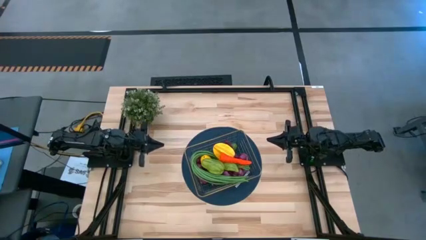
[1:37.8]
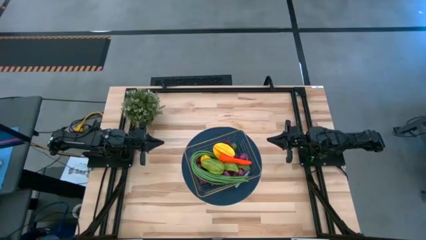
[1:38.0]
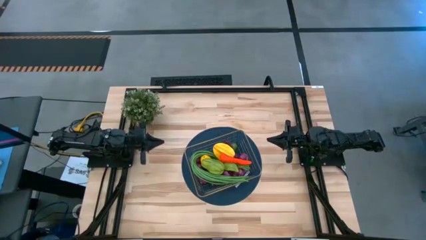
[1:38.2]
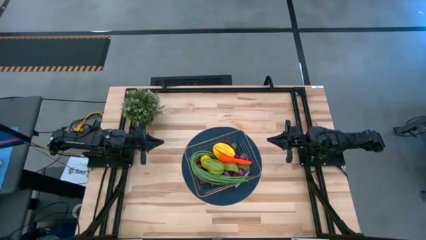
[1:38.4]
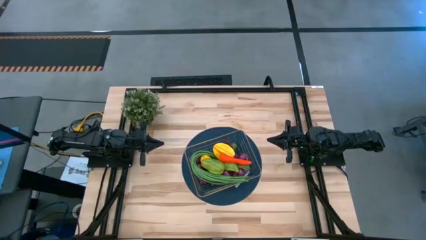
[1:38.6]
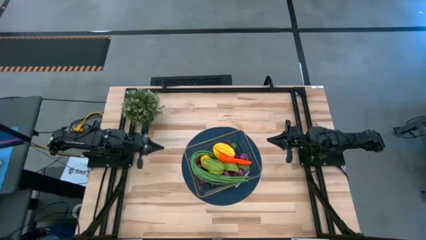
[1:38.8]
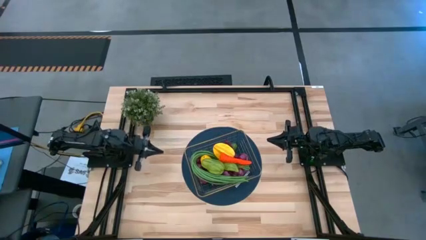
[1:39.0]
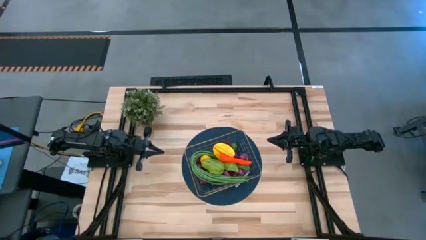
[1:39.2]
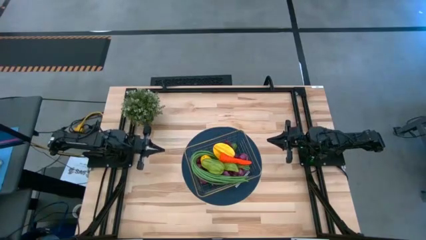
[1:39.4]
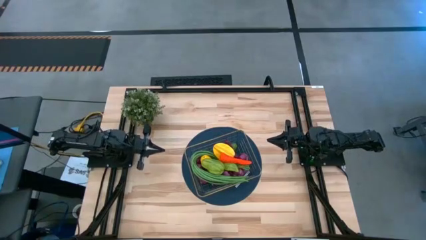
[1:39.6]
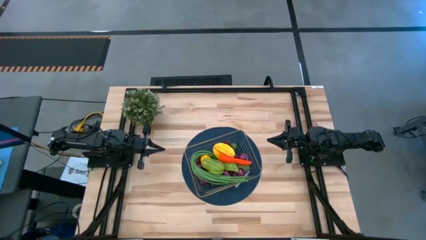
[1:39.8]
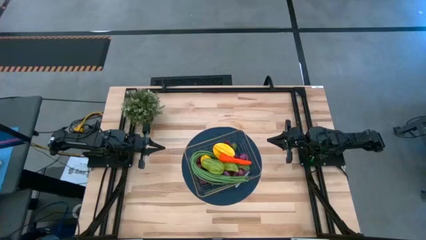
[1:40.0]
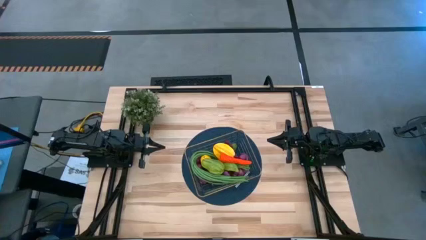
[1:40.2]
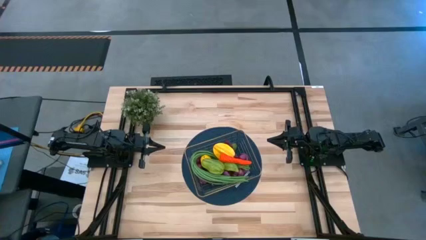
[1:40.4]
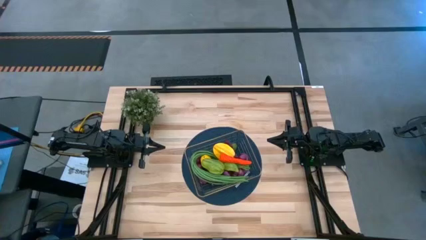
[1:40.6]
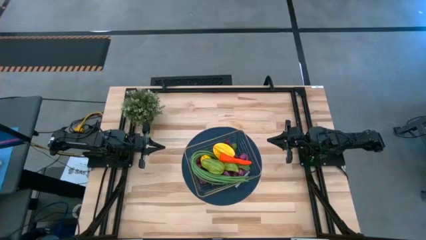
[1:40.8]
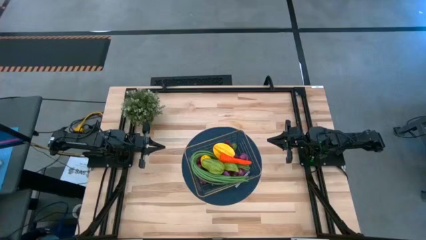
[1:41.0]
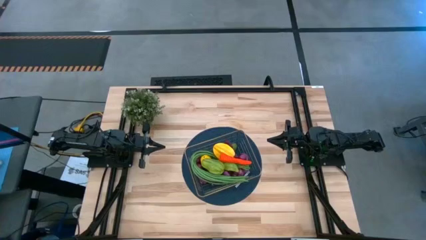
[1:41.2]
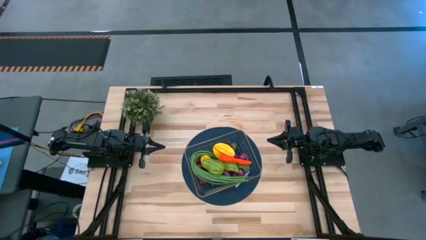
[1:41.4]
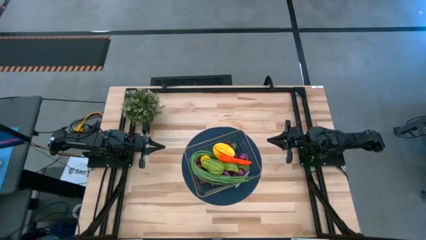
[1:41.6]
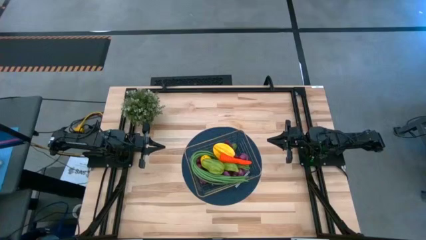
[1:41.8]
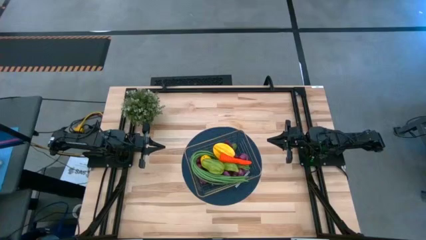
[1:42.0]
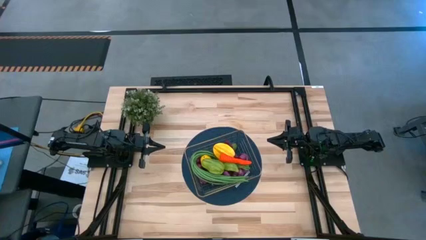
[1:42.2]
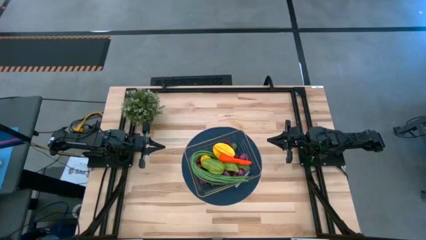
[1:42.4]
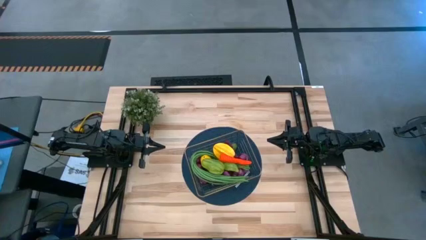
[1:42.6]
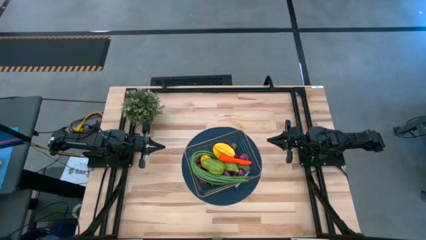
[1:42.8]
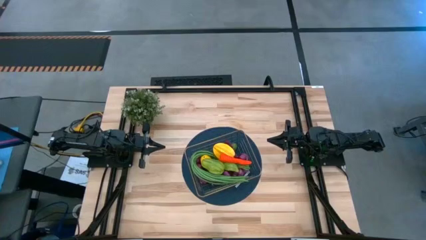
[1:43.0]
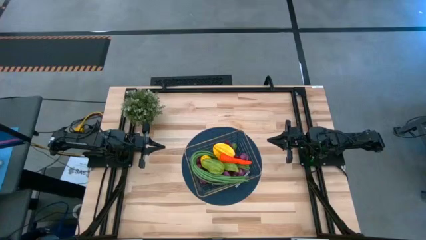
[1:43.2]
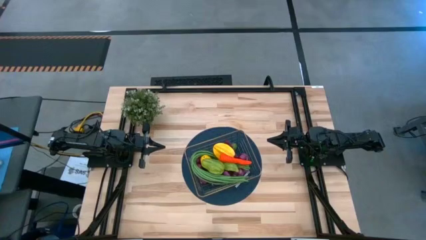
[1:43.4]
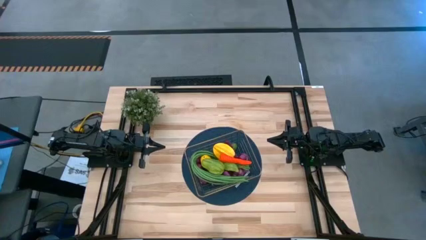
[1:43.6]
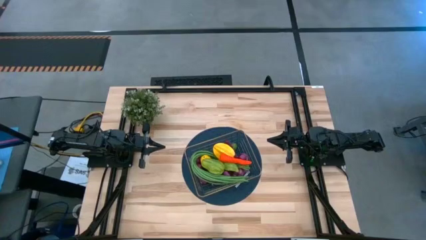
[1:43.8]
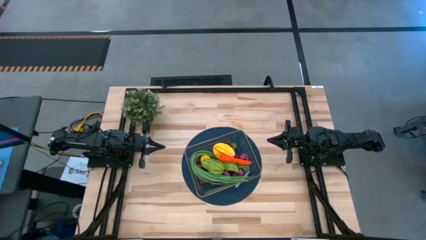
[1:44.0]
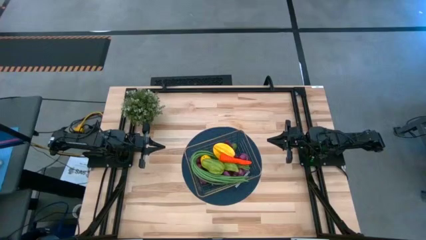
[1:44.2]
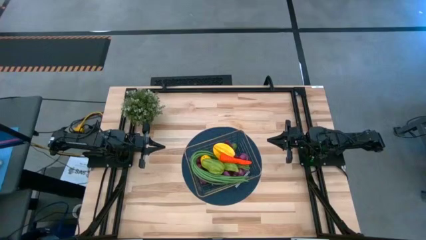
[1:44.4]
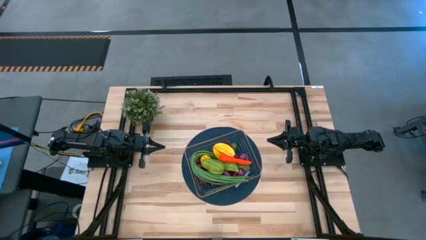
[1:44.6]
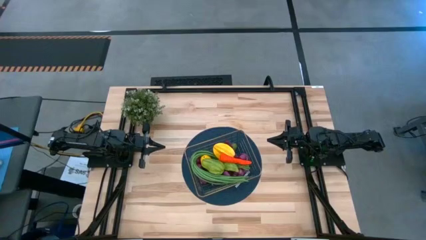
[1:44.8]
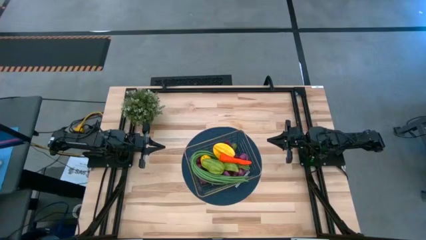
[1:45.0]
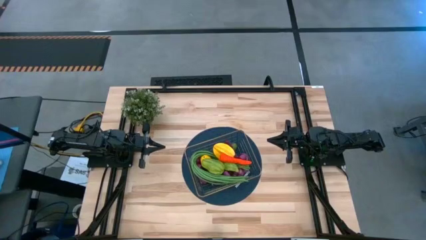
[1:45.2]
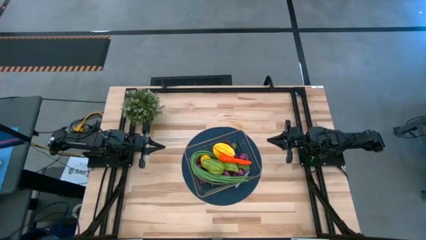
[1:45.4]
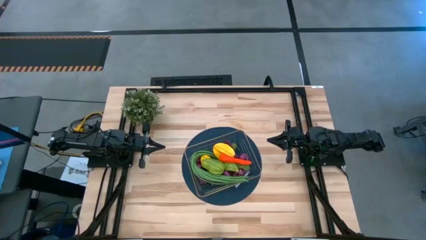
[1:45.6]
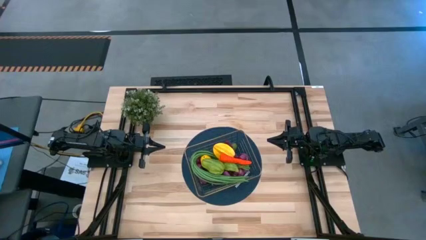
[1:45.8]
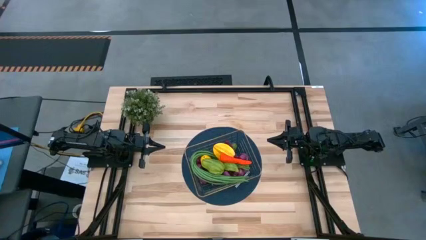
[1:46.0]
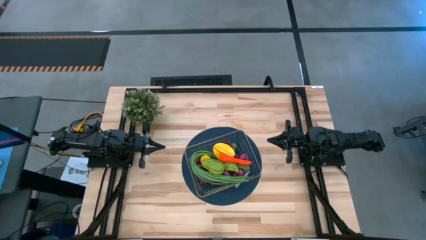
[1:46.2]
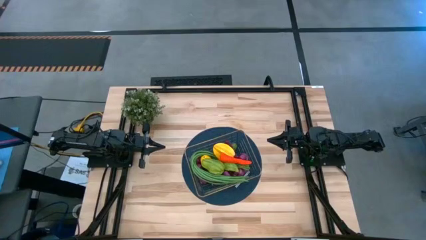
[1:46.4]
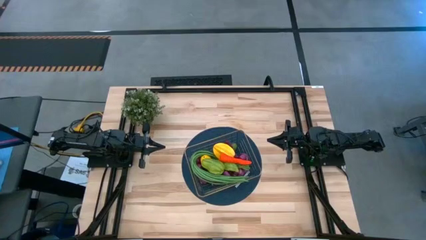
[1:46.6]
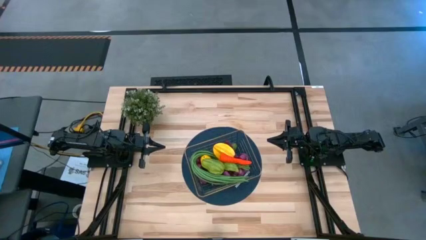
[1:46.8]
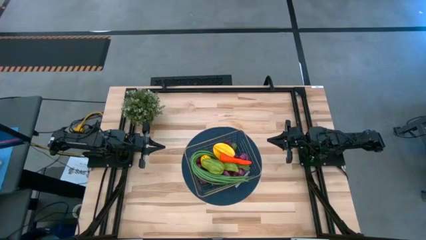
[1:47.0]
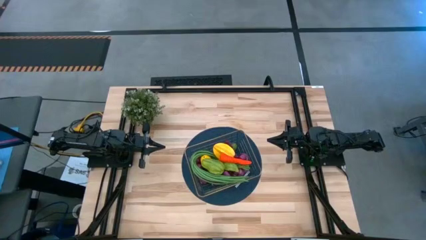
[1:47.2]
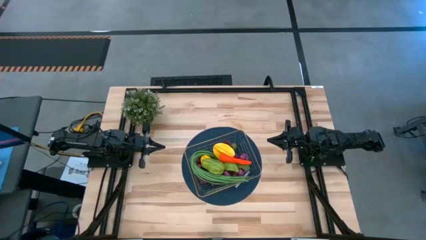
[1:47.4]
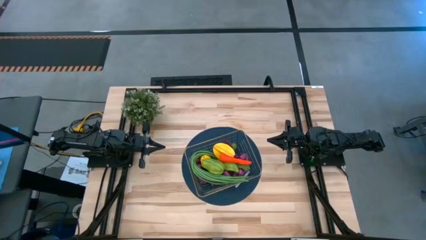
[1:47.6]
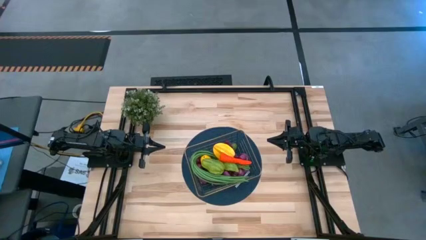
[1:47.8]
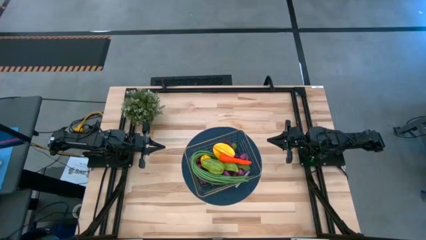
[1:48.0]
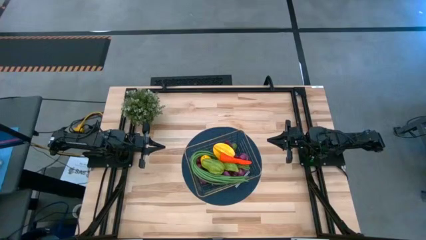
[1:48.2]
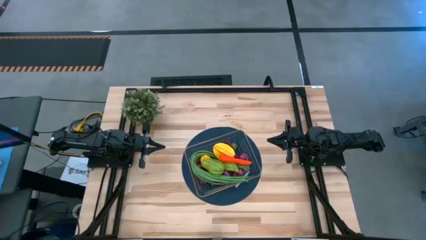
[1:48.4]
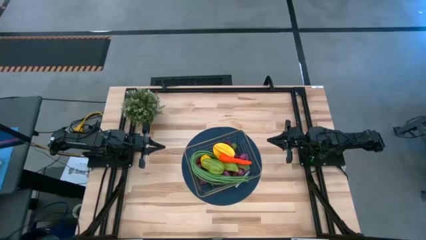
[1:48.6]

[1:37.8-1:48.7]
Task: Build produce basket
Return to Home Position
